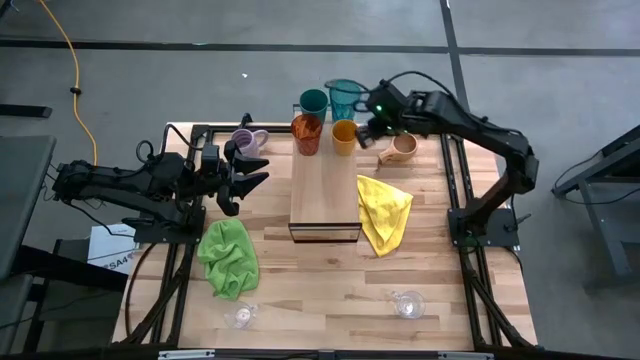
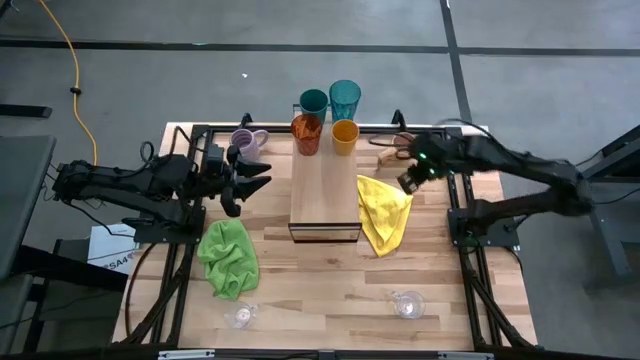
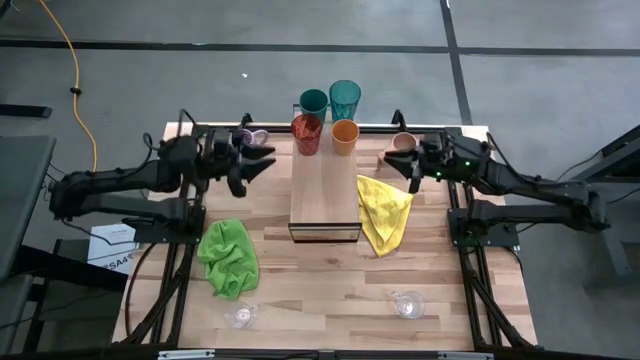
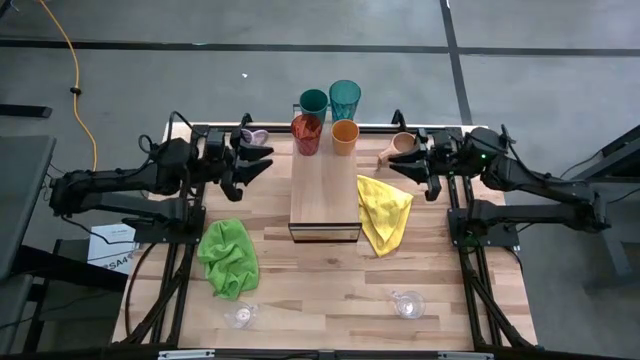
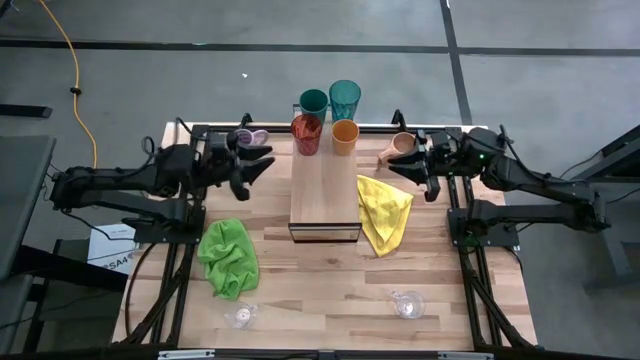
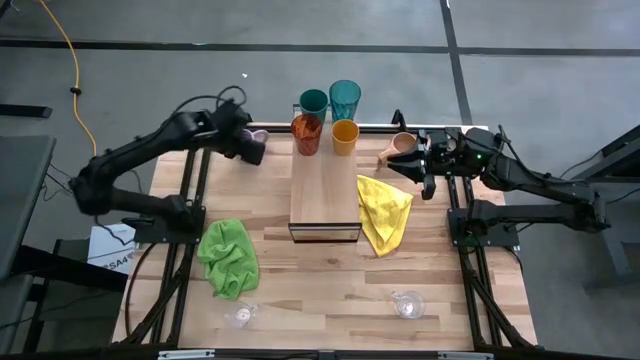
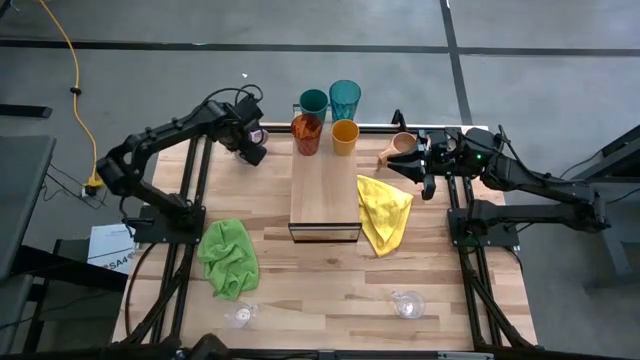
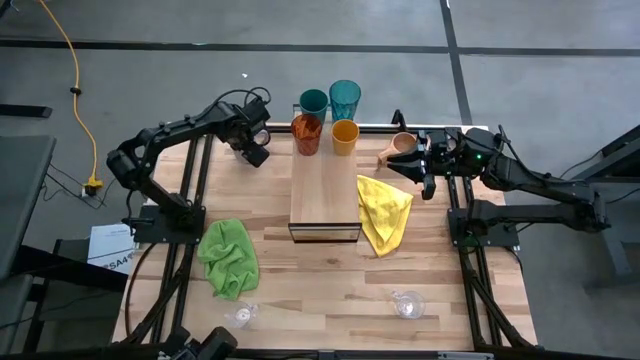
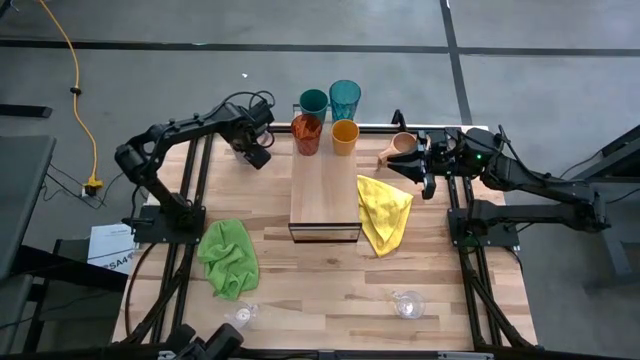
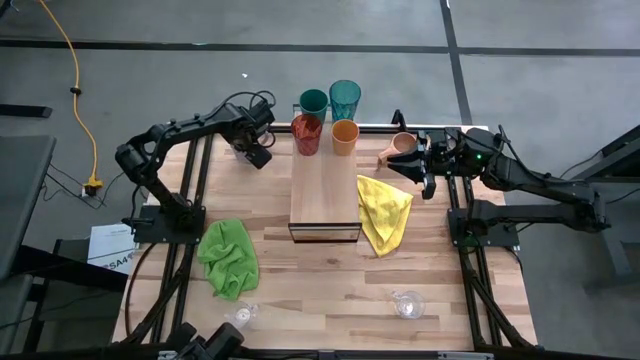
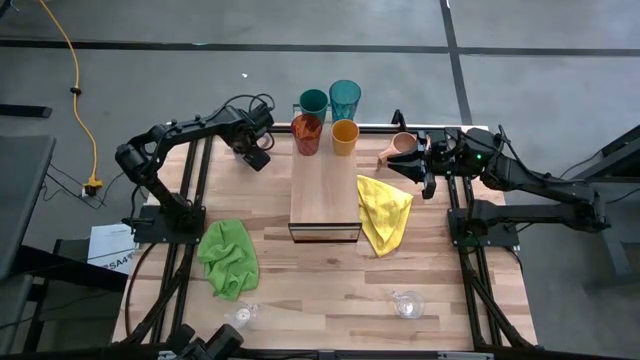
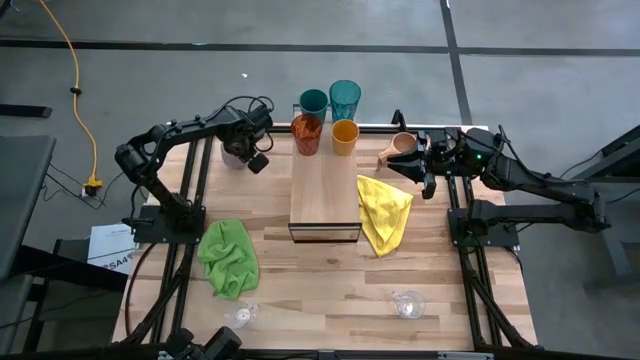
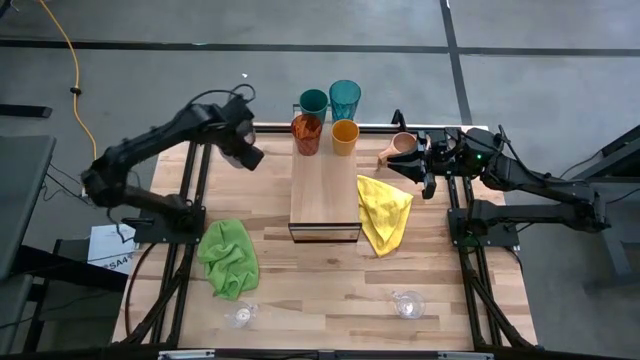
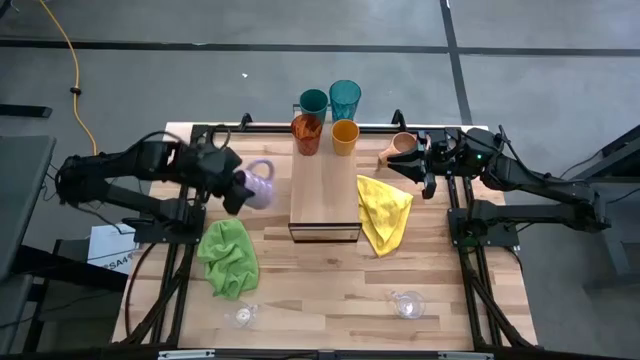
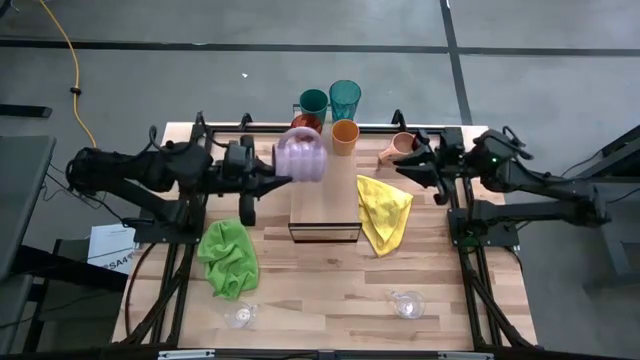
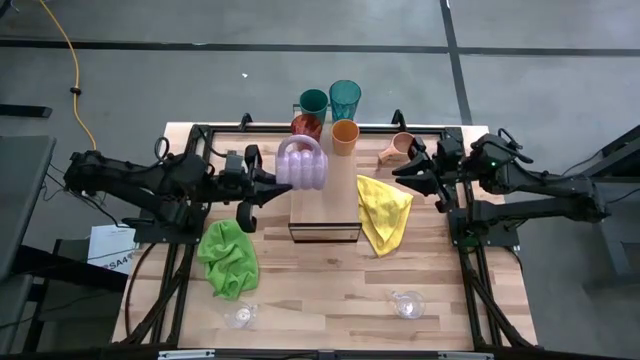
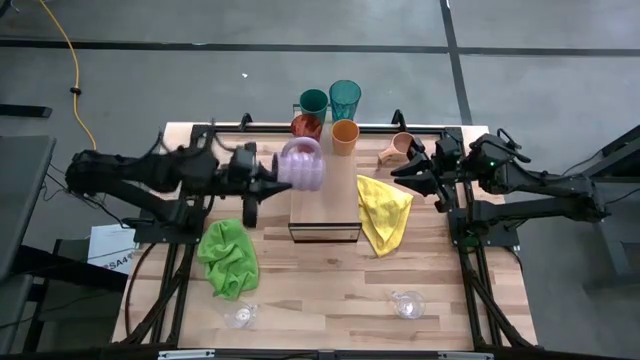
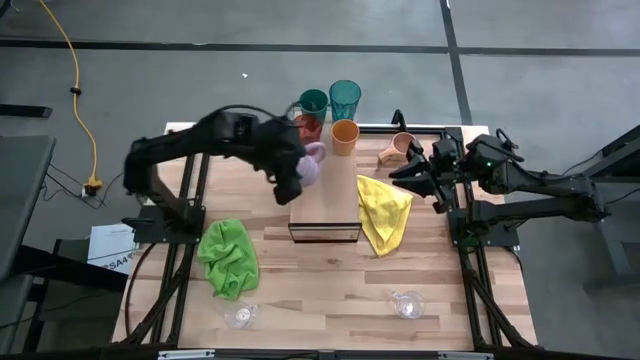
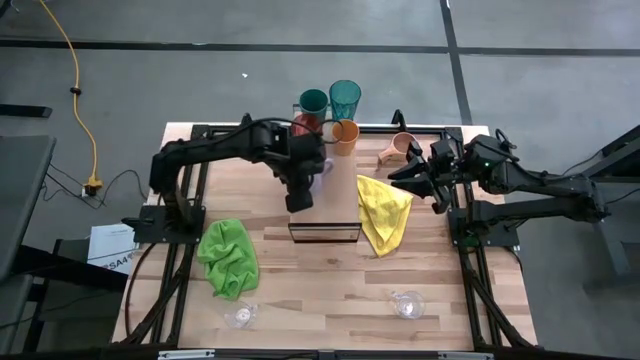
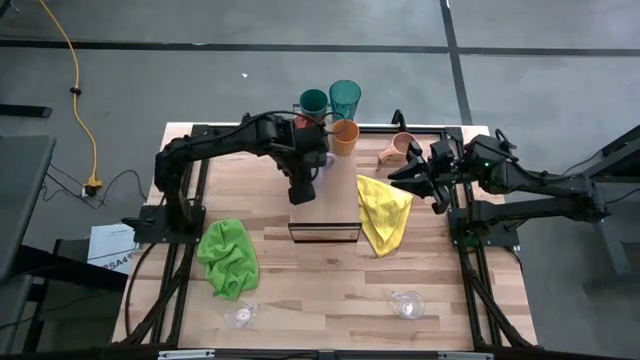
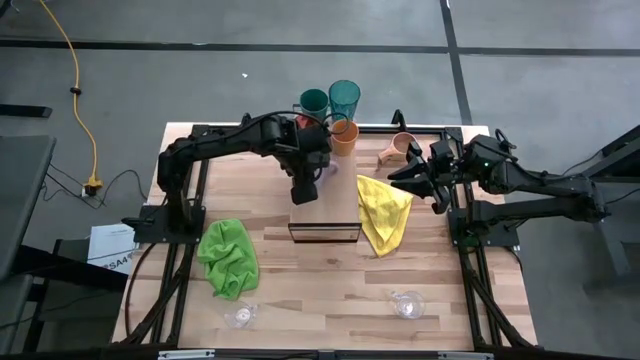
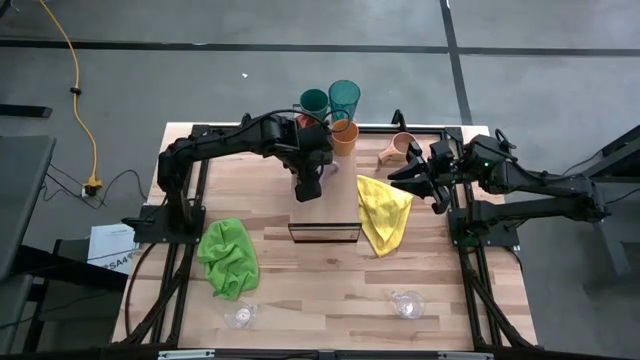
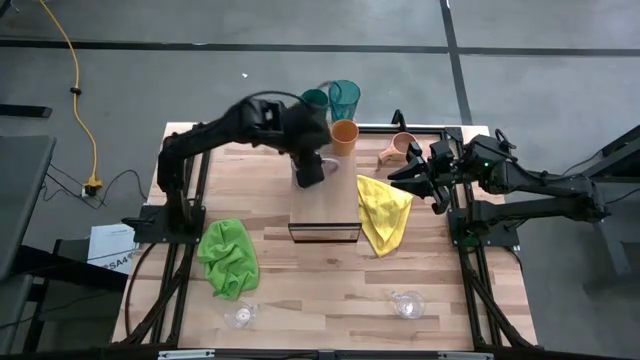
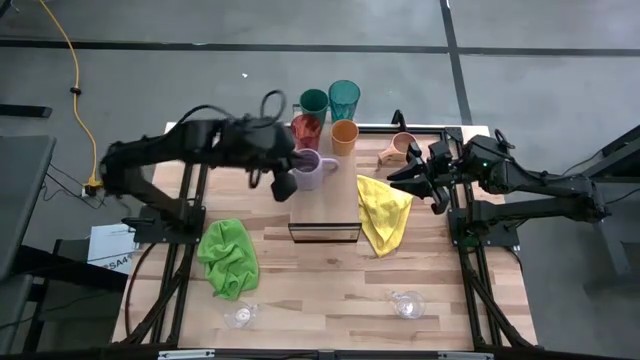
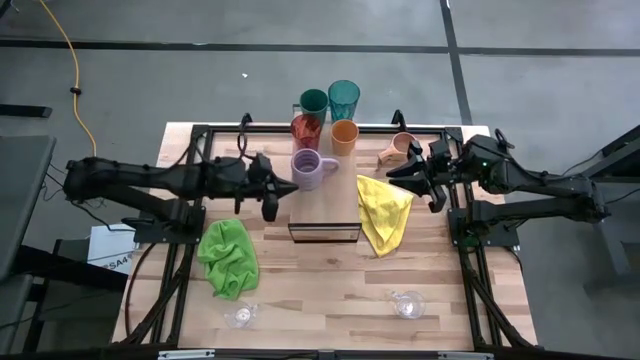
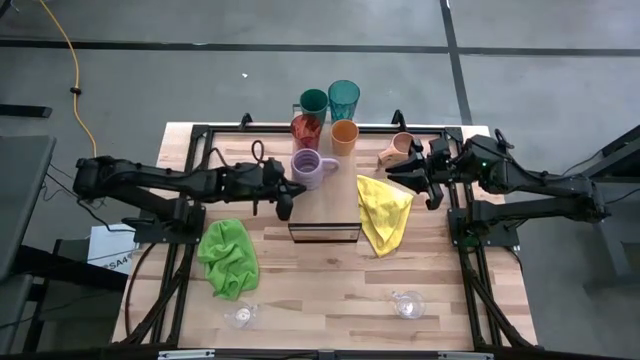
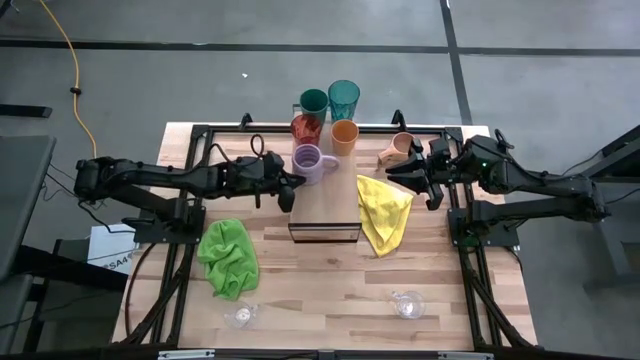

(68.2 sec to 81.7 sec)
Task: Stack small to large cups/mugs on shelf
Put the violet mug on the shelf

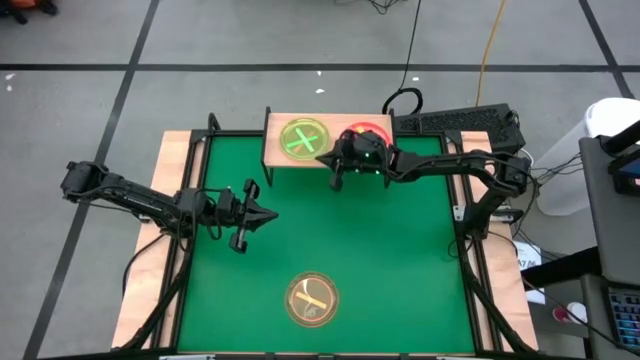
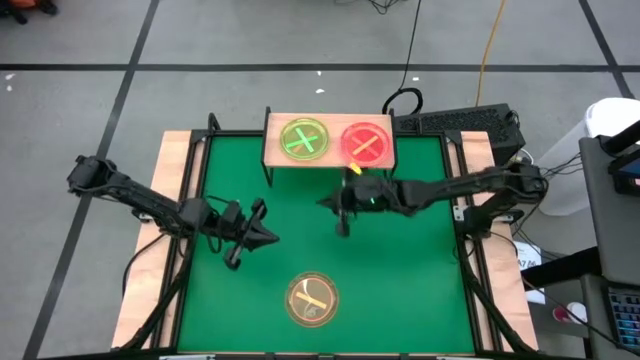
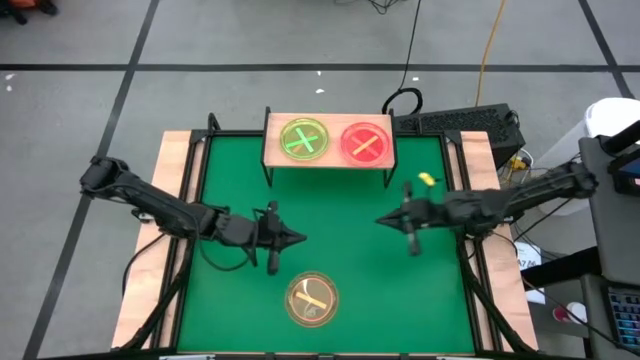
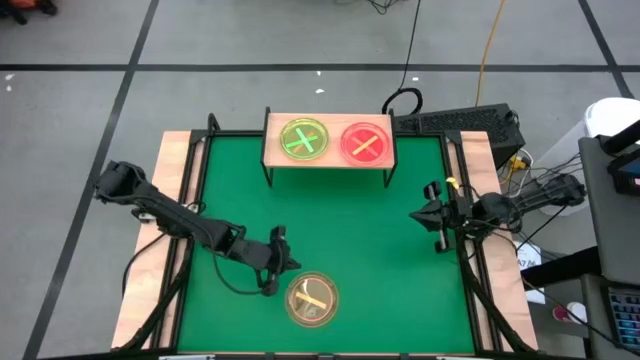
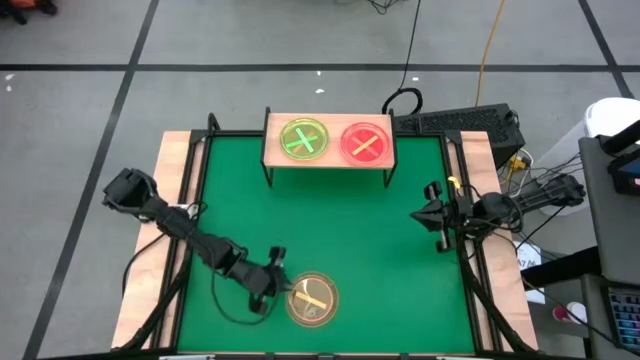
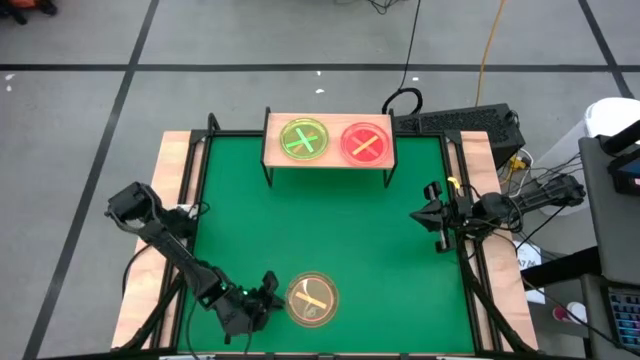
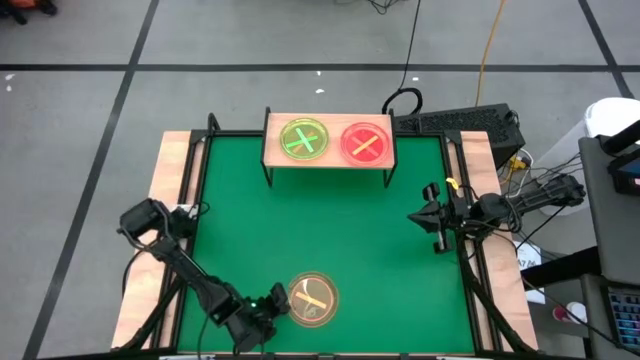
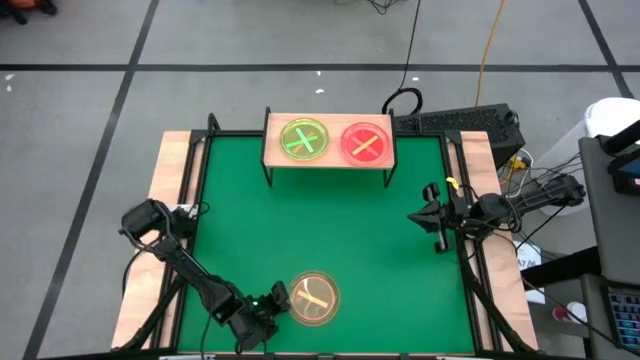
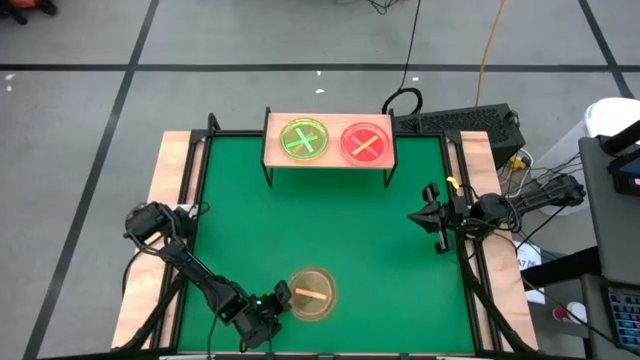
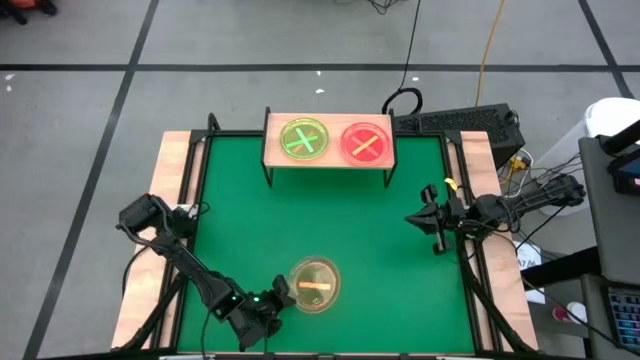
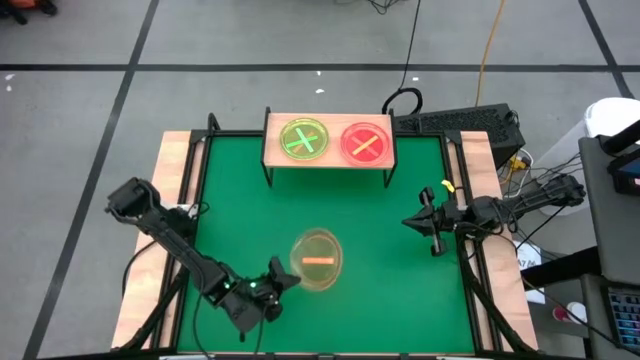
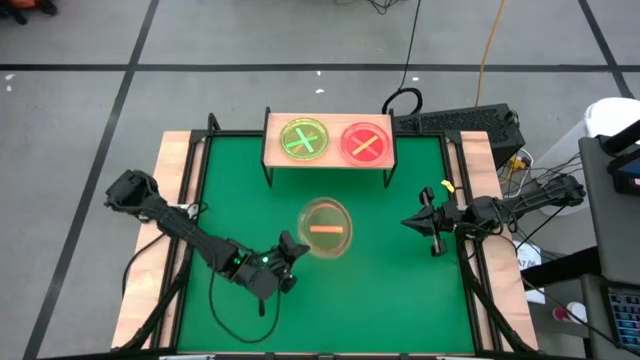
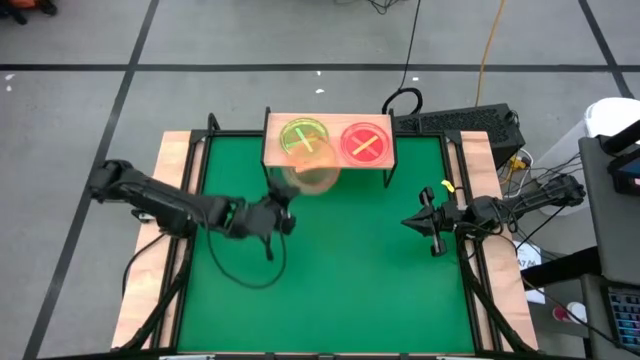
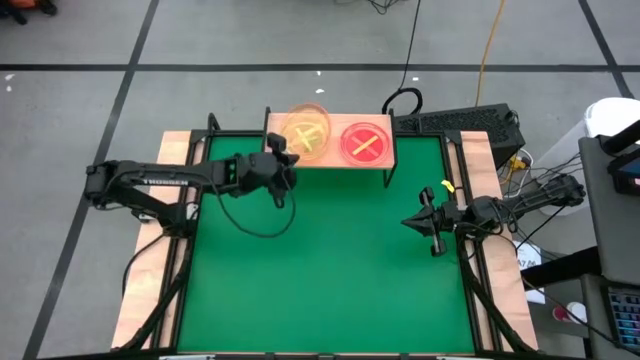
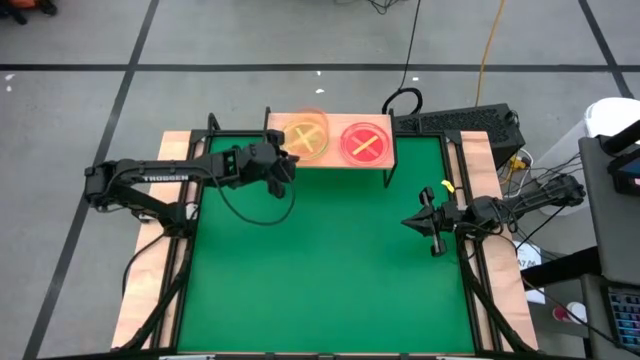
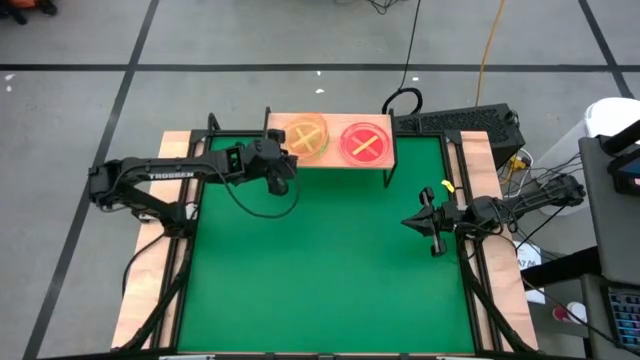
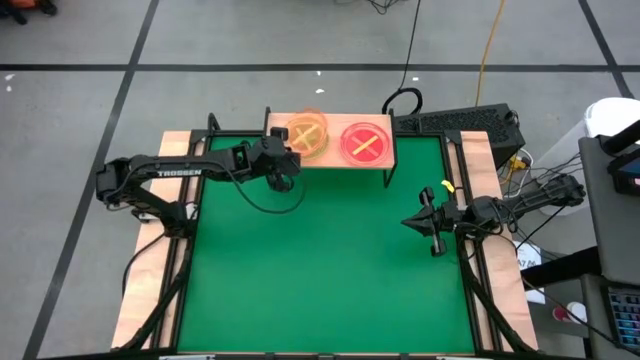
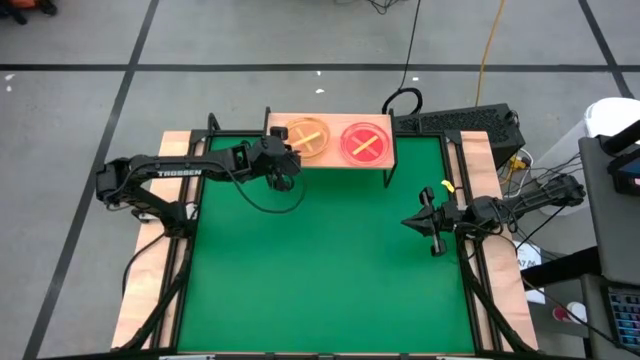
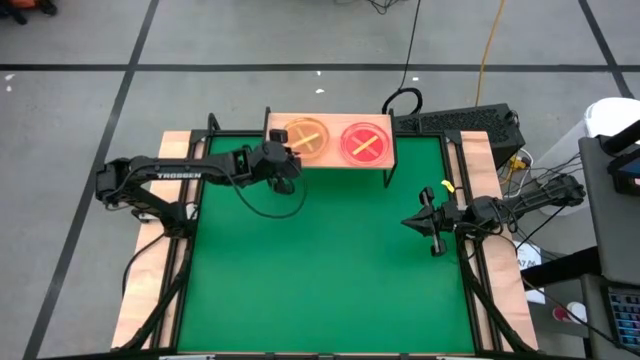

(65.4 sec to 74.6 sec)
Task: Place and stack plates onto a shelf
Stack the orange plate on top of the green plate on the shelf
